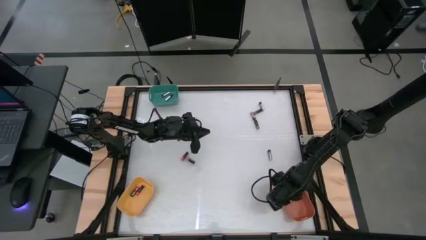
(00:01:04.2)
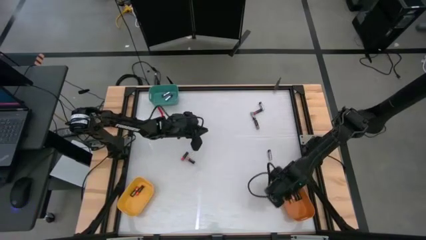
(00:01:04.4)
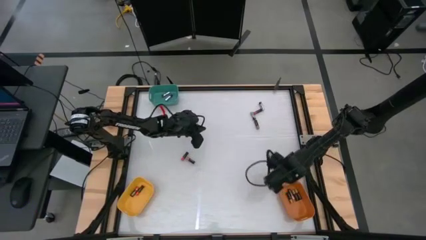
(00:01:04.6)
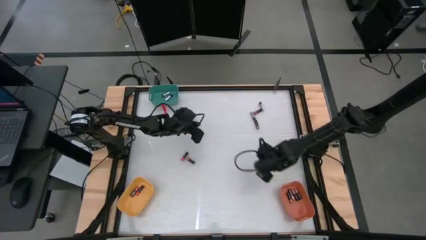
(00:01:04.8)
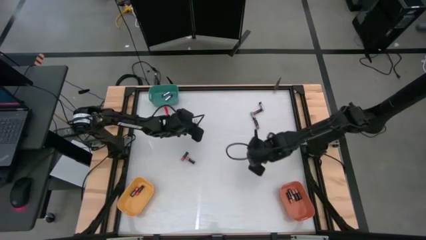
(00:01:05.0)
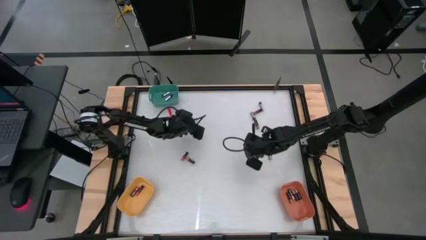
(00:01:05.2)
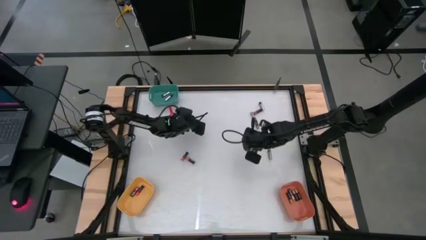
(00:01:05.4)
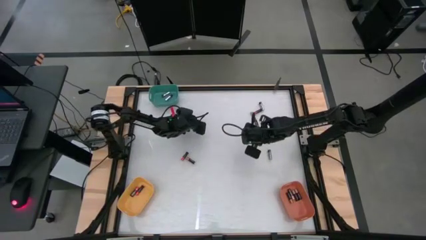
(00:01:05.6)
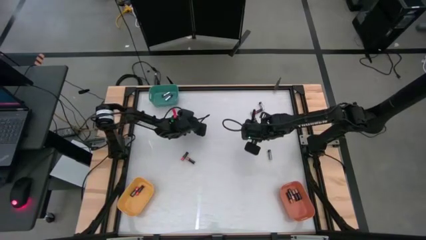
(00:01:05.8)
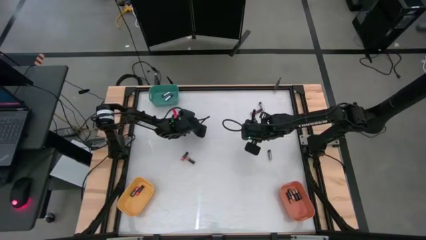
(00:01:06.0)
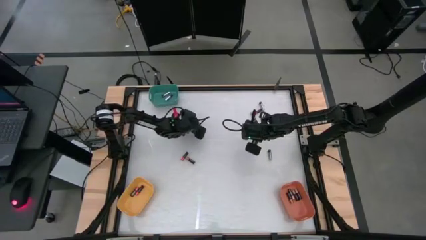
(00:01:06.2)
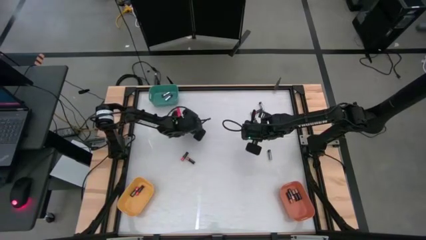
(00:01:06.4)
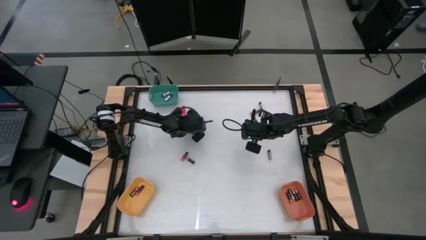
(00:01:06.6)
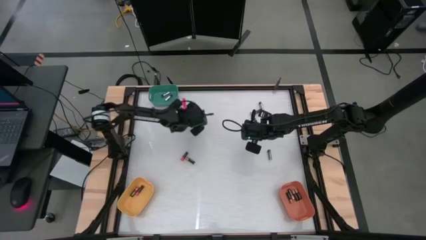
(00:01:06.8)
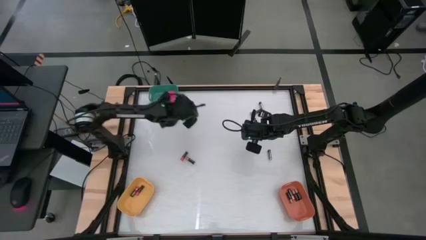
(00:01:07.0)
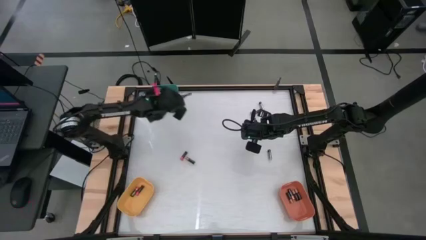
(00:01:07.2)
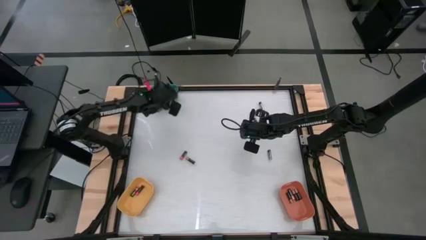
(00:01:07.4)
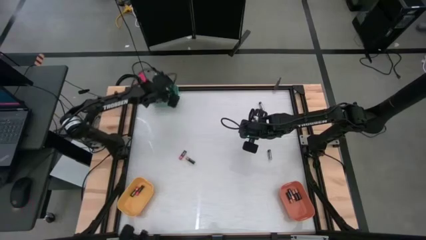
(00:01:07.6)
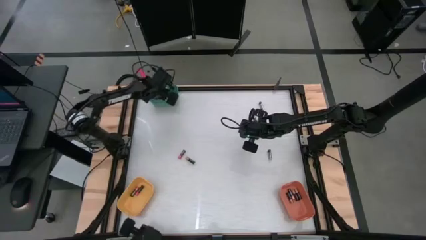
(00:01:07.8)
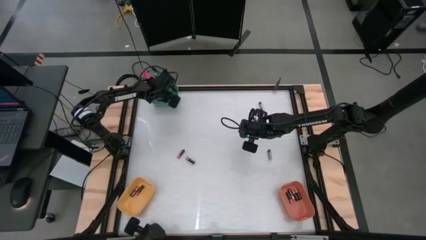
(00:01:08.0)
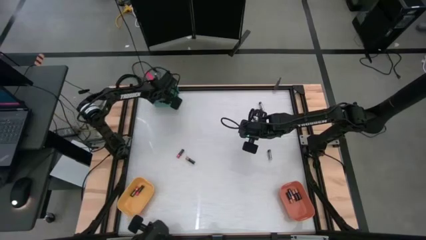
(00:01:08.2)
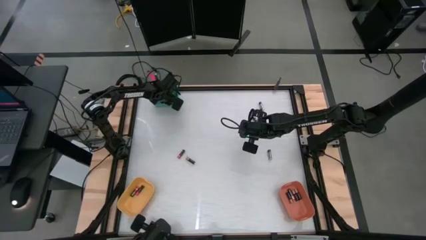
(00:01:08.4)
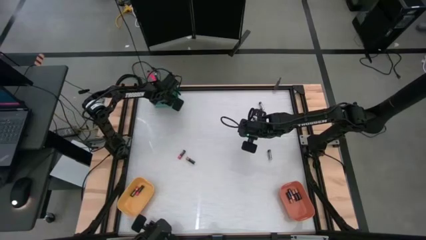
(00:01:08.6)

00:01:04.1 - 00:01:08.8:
Task: Sort batteries
Put the top left silver battery into the blue bin

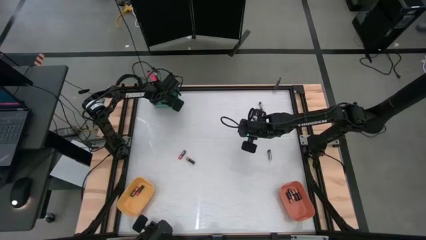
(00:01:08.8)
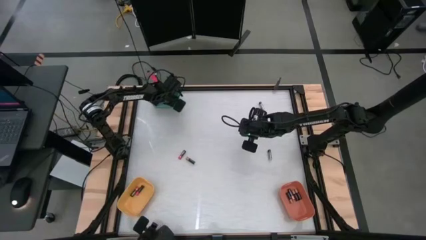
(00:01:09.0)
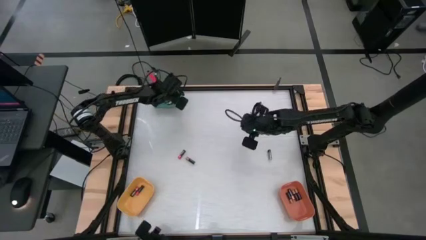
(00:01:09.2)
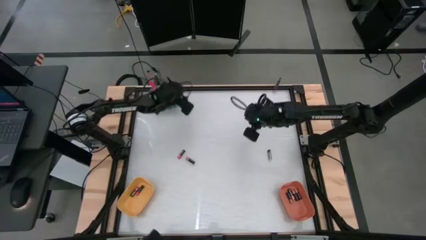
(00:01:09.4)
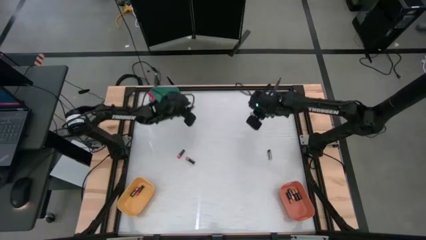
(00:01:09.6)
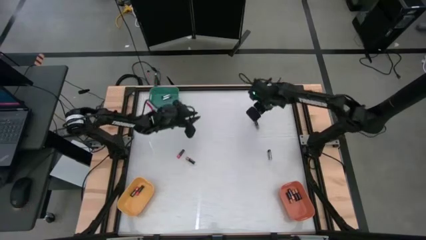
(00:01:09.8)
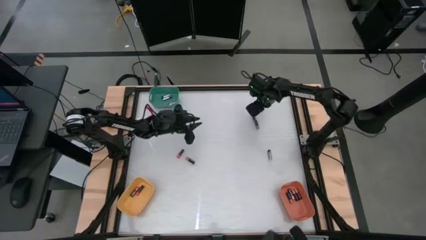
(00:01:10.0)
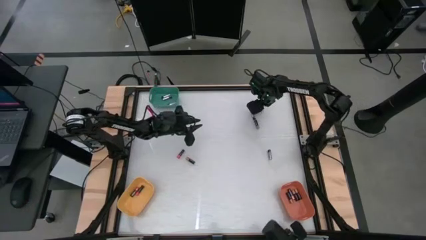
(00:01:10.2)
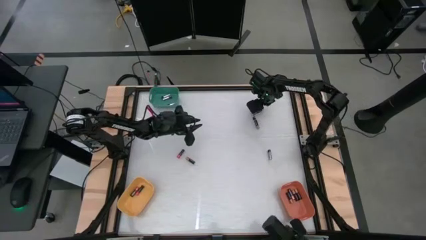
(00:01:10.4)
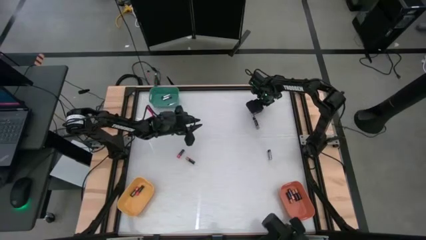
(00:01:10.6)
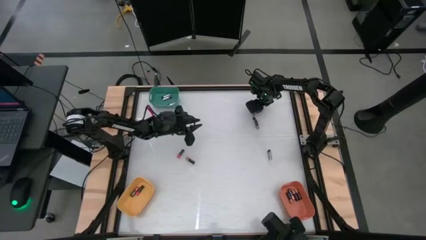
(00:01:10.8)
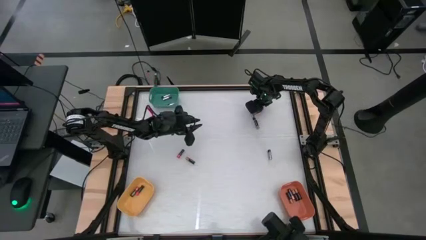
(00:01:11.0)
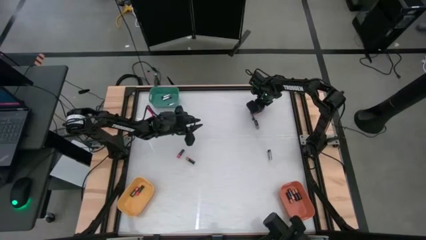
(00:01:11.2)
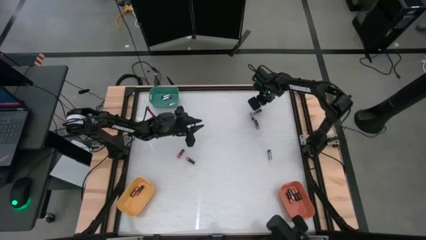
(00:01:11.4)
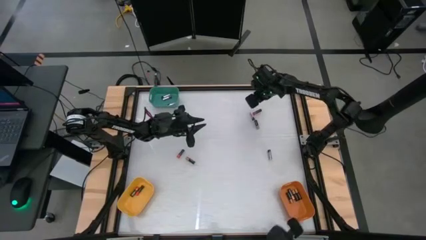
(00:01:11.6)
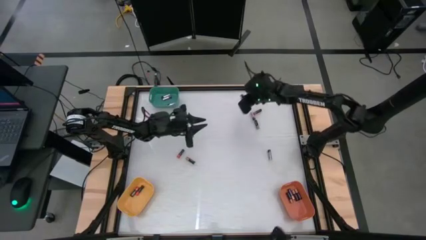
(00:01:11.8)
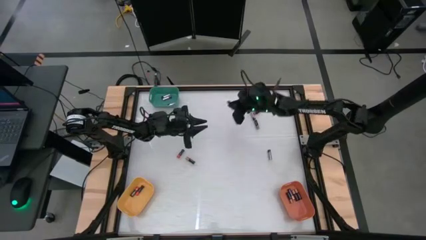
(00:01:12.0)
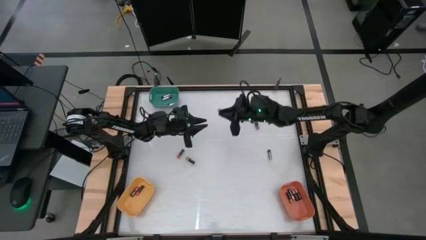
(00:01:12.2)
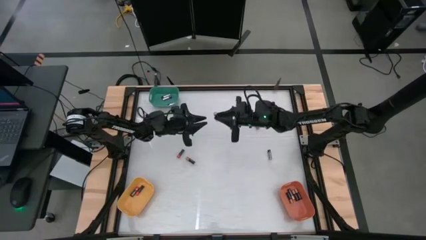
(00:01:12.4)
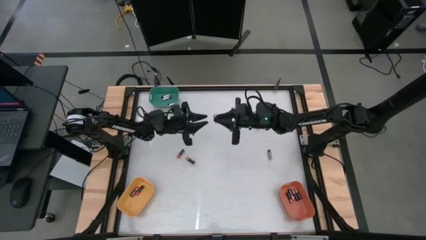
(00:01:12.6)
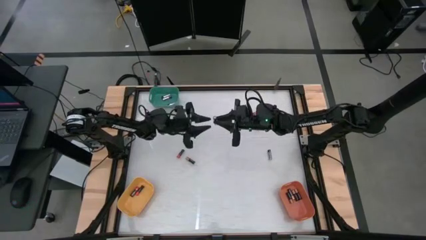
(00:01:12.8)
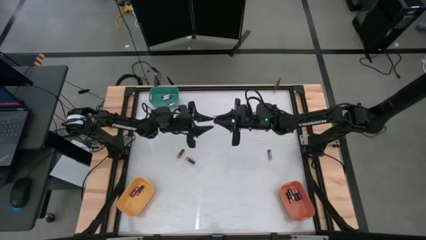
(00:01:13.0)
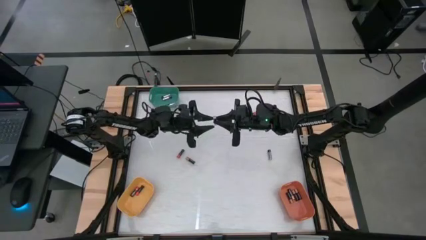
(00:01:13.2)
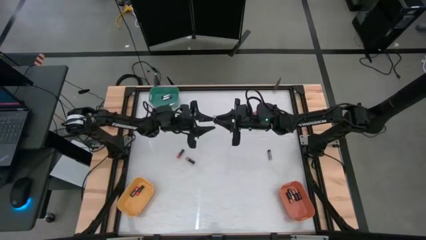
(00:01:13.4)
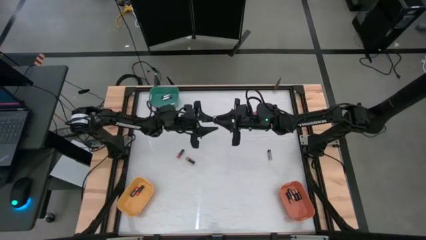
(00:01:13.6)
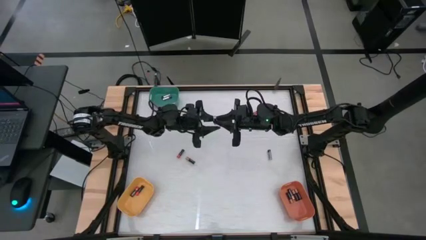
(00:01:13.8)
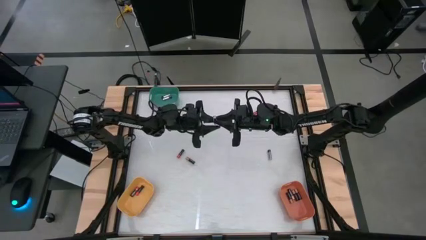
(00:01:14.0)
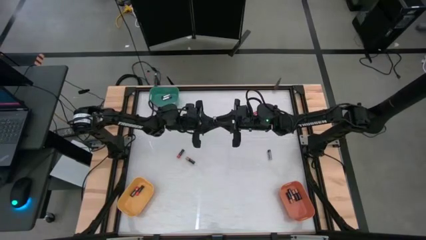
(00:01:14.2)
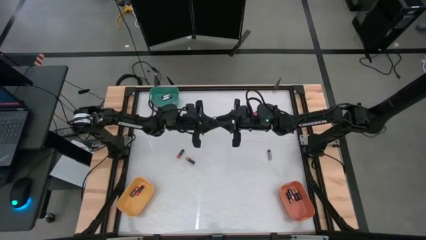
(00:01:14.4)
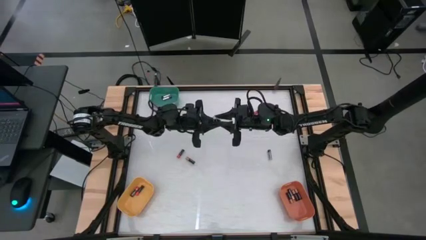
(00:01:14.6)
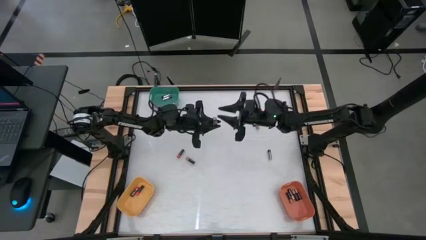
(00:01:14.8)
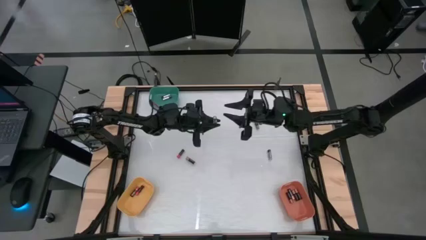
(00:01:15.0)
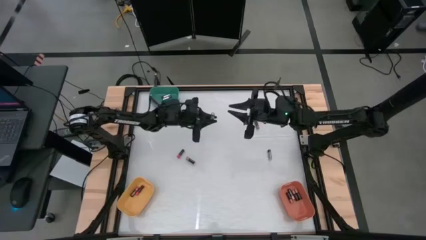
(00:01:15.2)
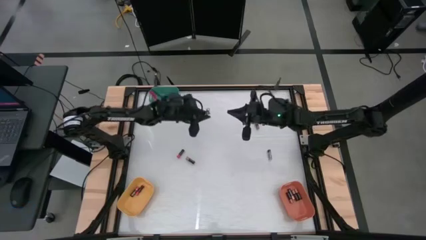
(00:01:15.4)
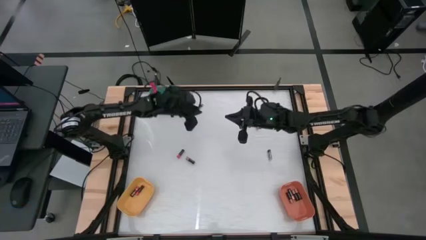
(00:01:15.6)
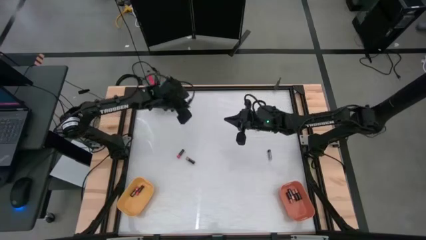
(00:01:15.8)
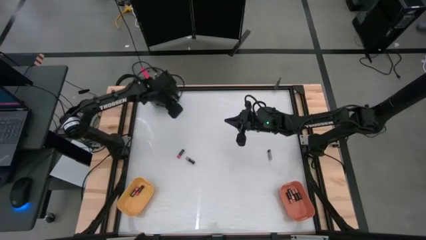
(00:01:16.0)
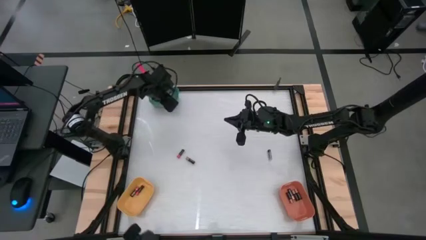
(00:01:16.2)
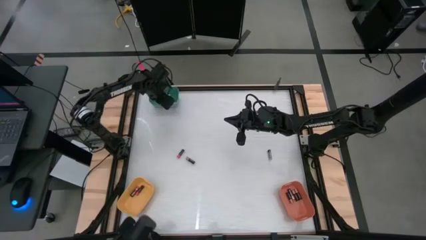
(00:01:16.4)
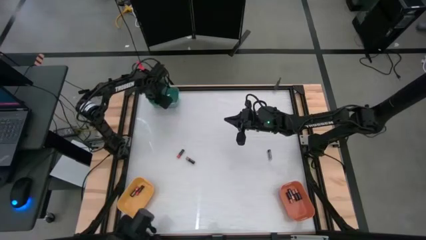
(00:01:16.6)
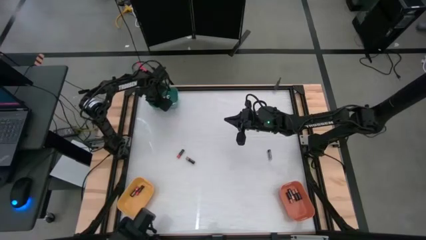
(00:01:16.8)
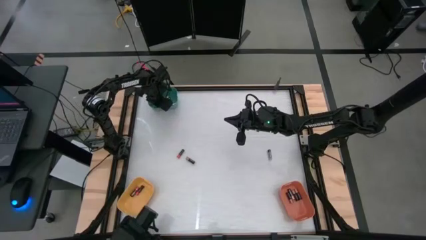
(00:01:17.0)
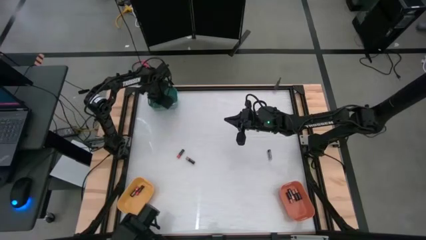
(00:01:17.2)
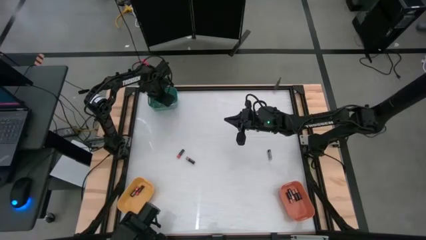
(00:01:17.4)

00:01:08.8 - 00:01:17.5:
Put the top silver battery into the blue bin
